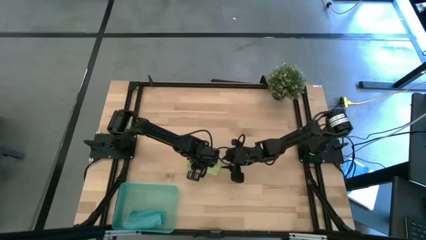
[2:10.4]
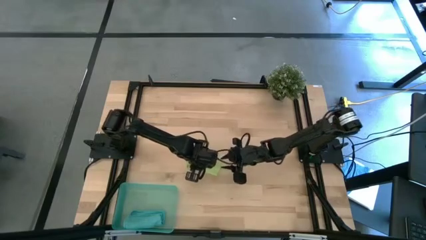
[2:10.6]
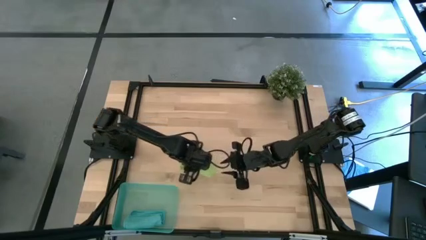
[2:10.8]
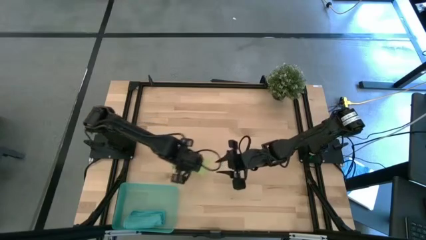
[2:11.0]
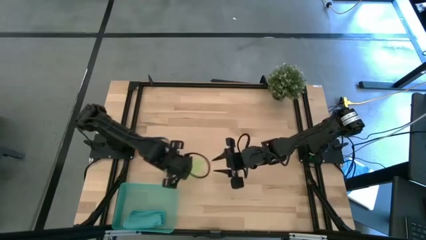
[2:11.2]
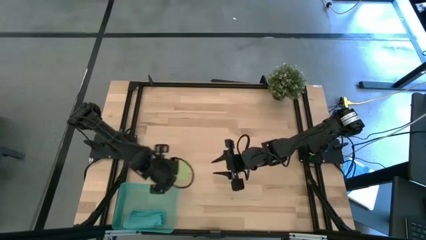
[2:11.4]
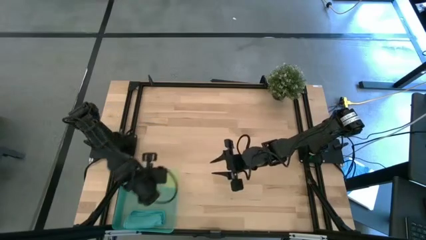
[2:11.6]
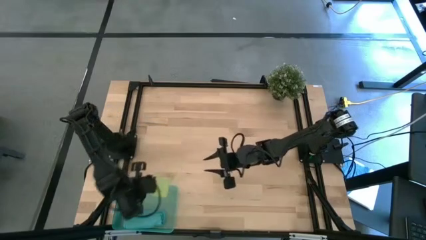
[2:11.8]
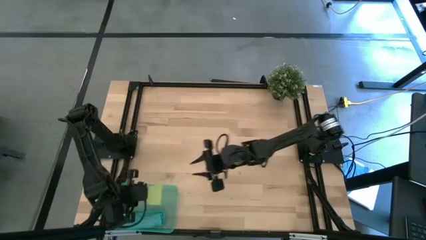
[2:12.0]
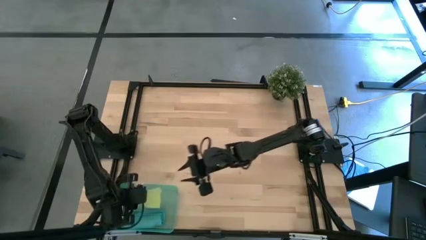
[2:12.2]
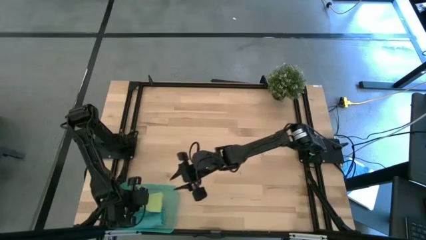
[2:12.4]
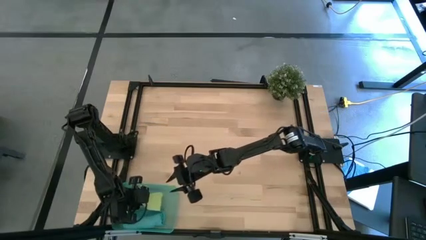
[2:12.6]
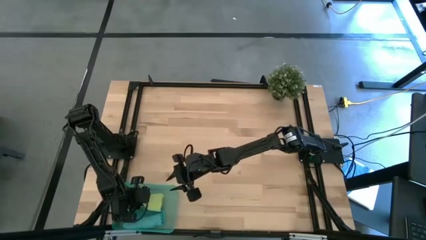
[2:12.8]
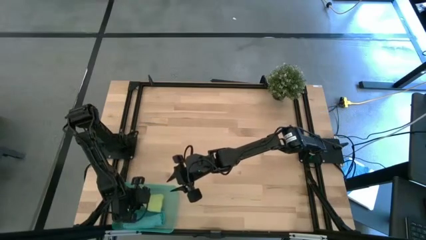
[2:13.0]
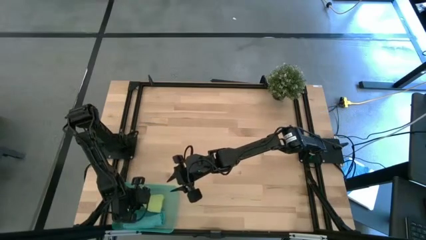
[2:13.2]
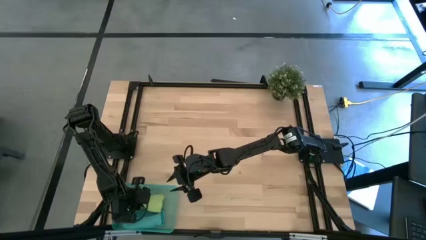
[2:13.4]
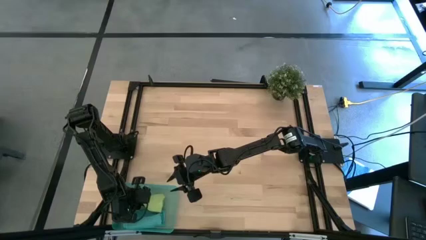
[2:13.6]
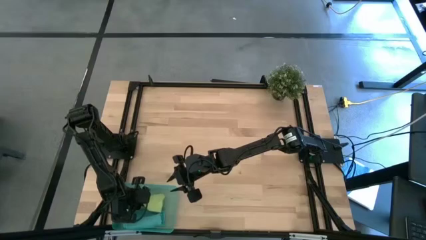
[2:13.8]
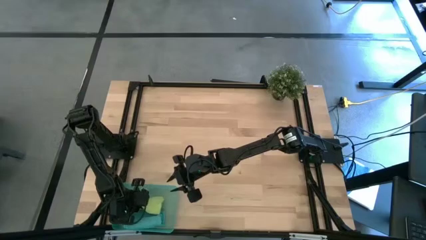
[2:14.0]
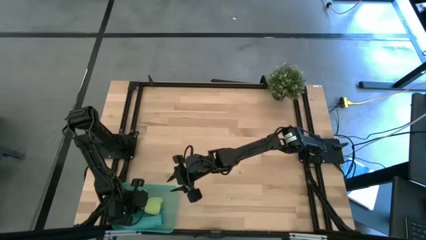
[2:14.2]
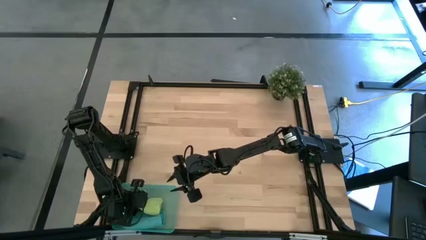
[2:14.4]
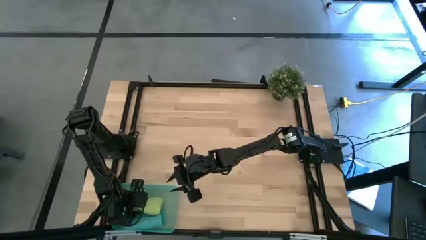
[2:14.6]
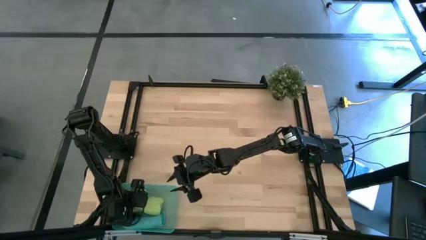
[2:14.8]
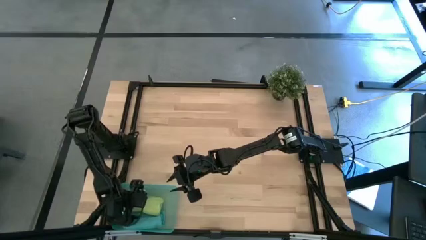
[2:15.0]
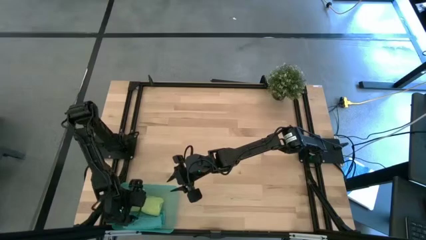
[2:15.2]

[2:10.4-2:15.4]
Task: Roll microfiber towels into tight, uniform cylinder then place into a basket
Put the rolled yellow green microfiber towel into the bin

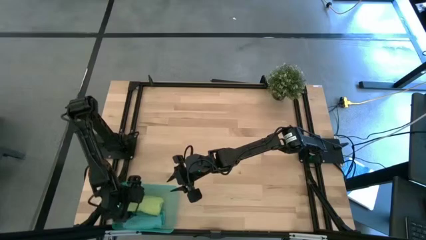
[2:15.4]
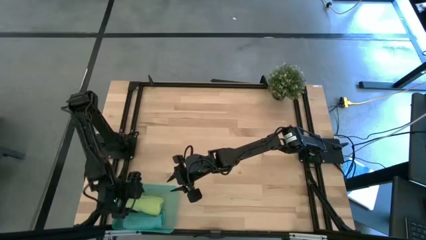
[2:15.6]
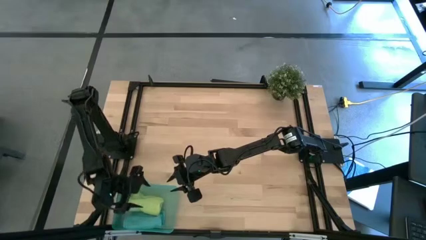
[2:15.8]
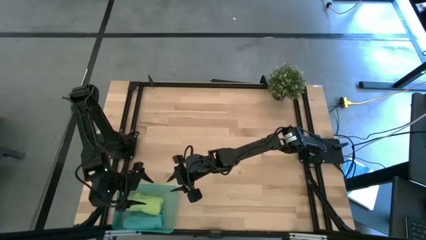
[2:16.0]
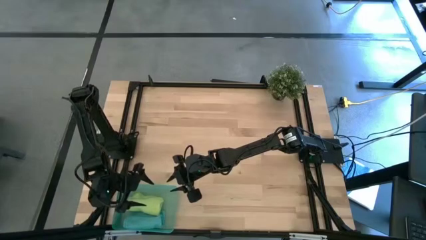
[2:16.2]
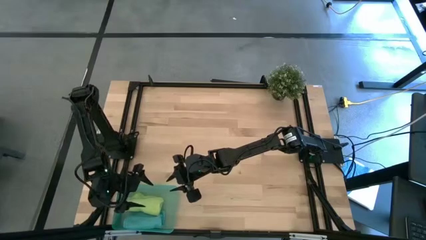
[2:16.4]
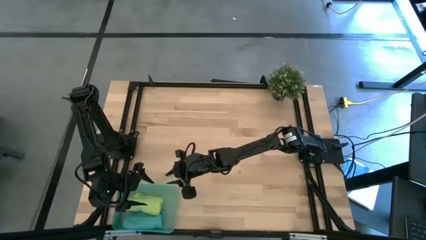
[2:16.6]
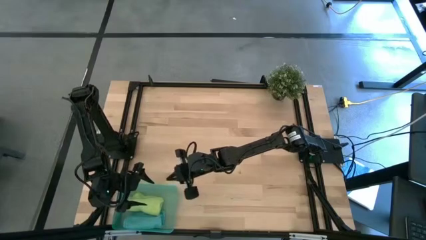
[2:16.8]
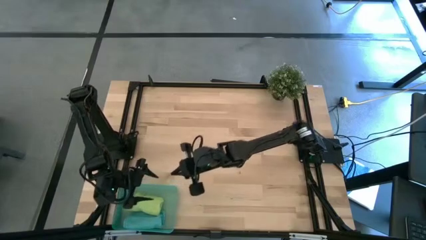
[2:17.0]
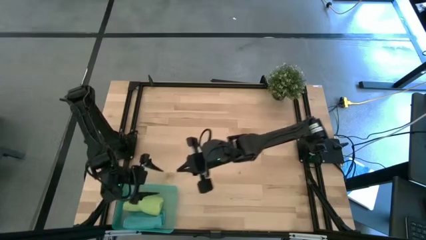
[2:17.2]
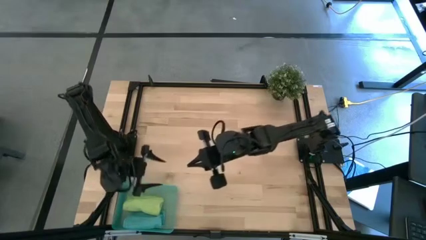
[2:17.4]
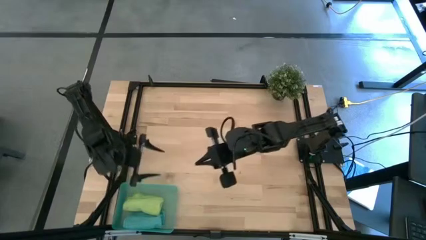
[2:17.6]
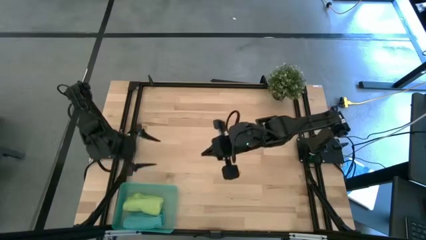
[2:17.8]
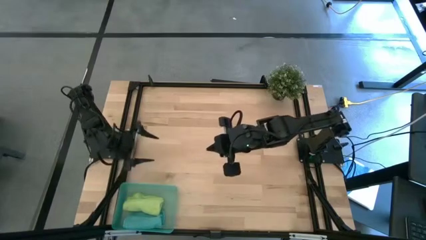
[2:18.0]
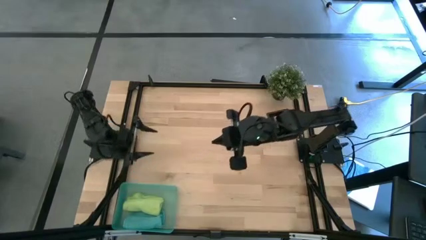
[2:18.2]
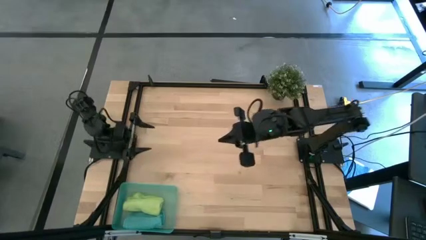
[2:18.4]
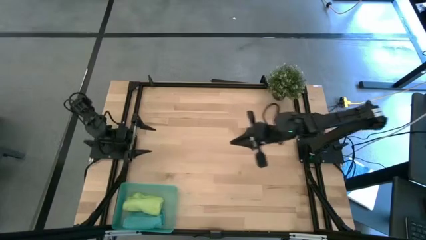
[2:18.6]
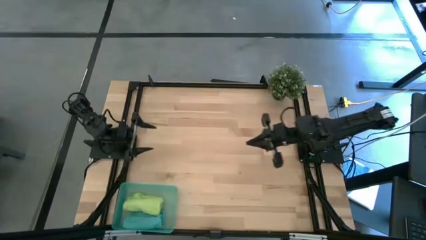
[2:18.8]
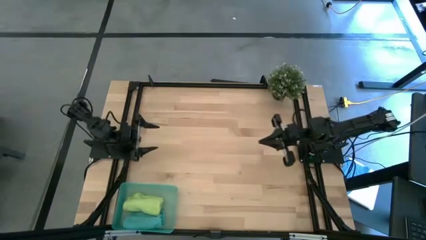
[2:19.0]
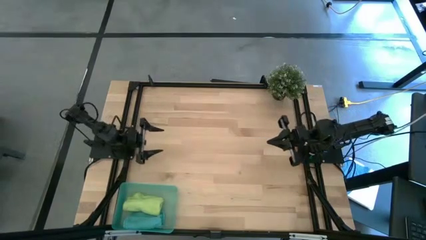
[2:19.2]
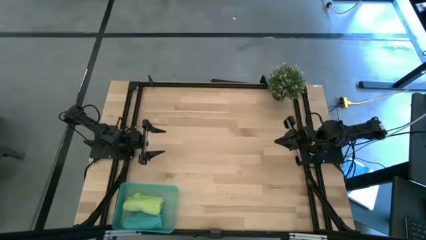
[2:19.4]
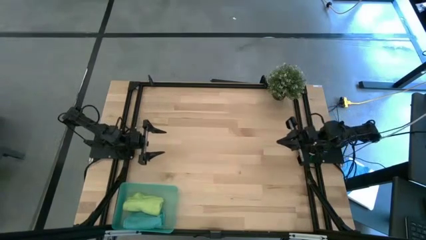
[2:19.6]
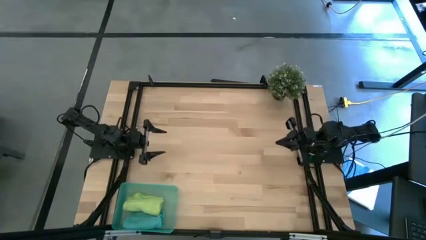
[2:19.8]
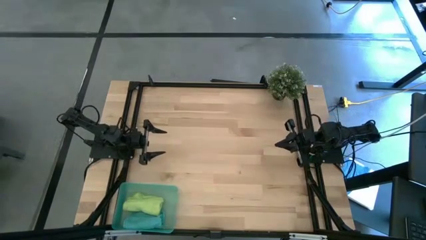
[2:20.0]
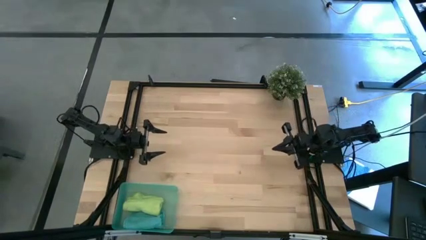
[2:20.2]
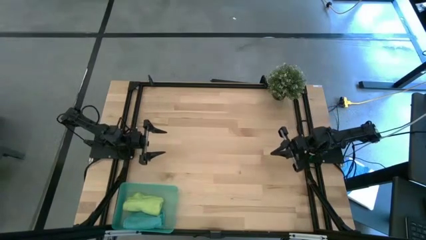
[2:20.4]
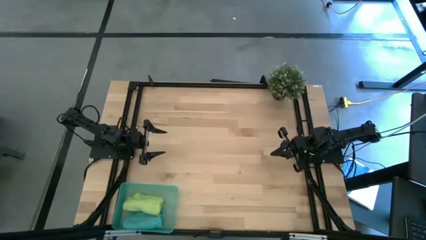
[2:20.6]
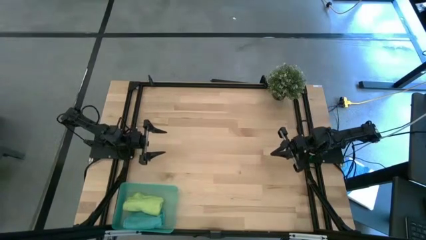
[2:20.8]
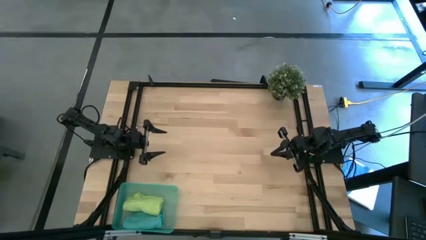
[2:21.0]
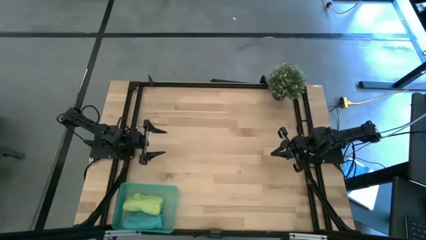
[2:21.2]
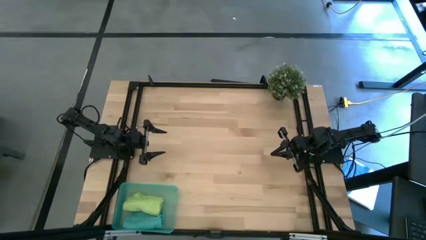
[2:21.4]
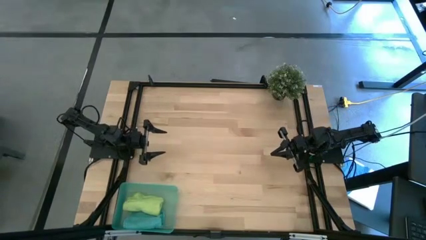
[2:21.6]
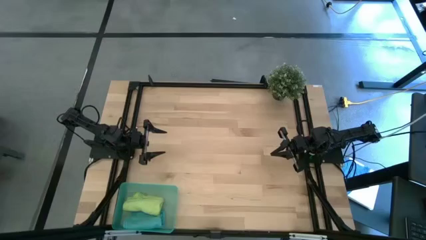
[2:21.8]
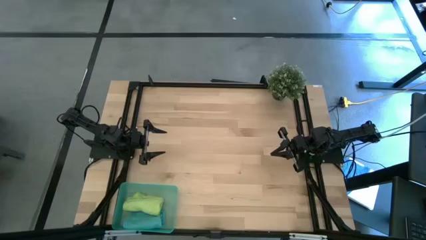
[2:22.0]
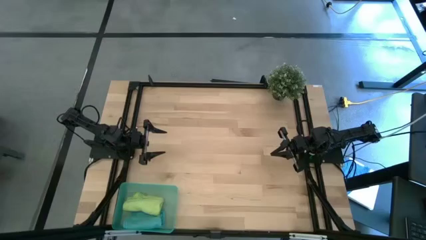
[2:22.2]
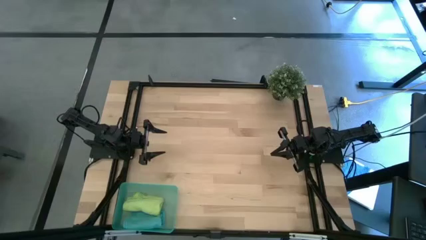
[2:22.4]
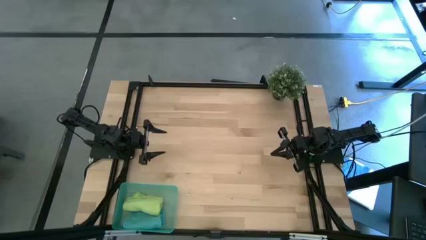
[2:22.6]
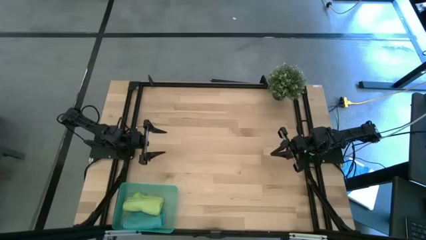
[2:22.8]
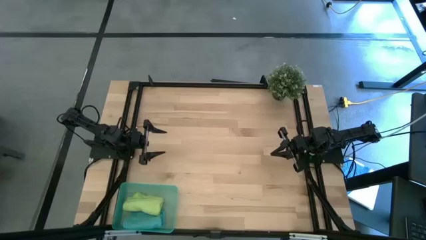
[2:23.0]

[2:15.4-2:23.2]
Return to Home Position

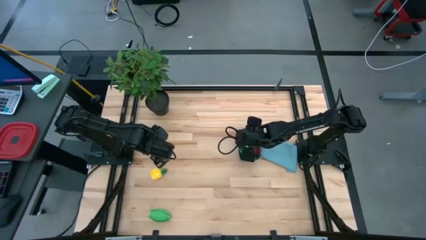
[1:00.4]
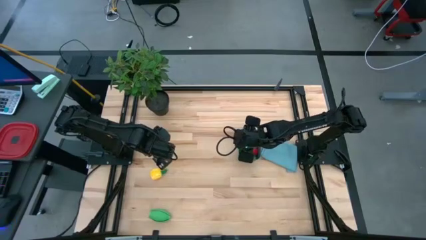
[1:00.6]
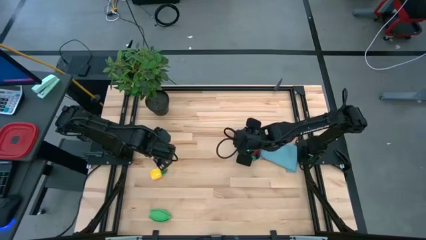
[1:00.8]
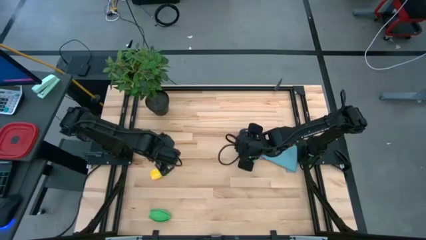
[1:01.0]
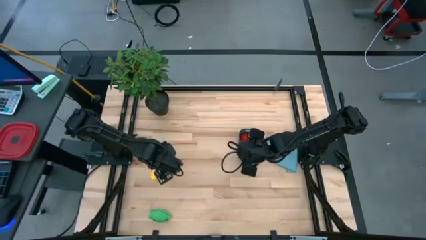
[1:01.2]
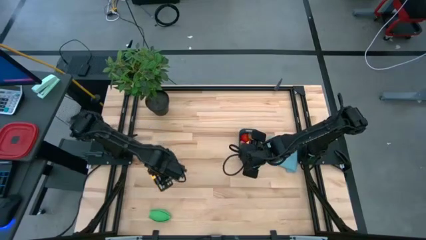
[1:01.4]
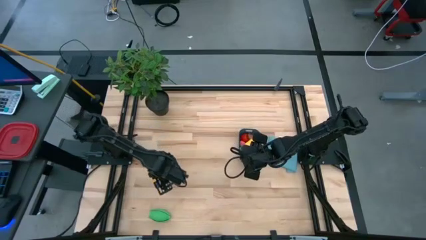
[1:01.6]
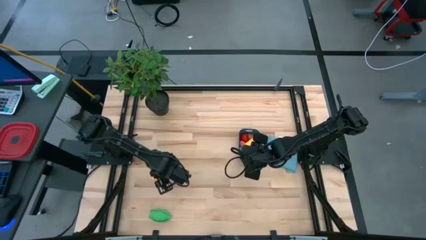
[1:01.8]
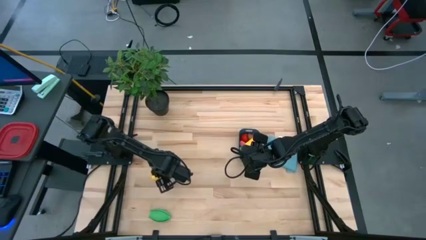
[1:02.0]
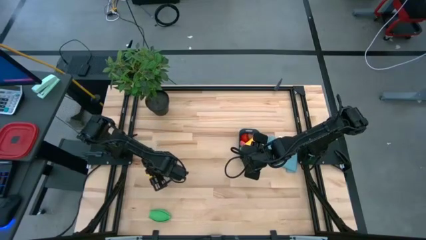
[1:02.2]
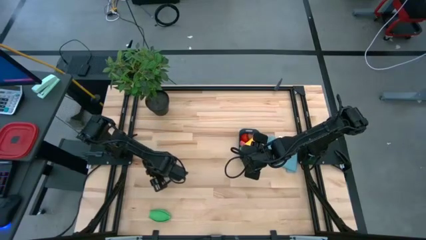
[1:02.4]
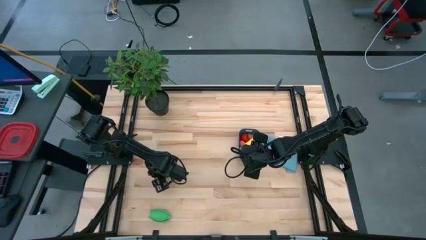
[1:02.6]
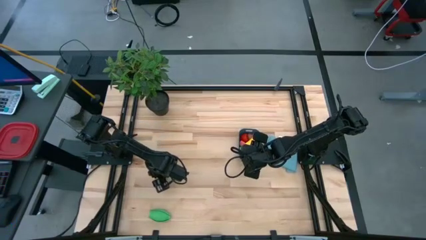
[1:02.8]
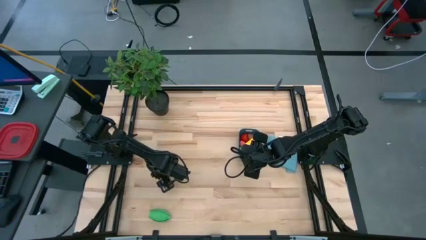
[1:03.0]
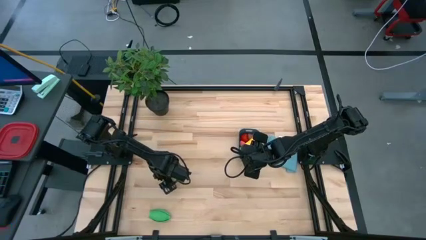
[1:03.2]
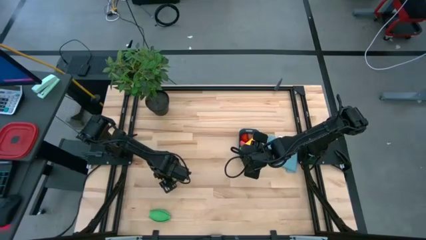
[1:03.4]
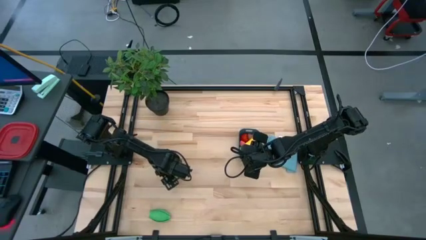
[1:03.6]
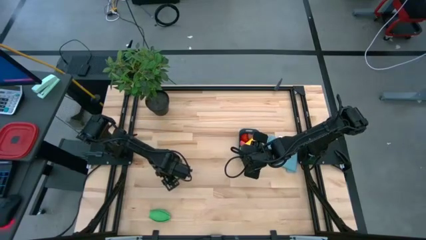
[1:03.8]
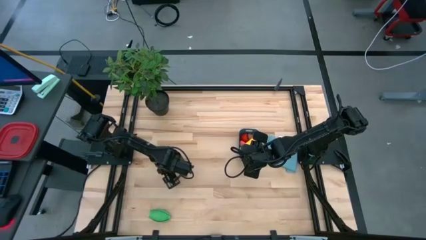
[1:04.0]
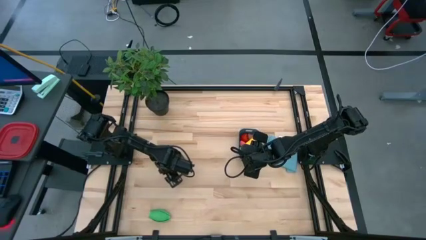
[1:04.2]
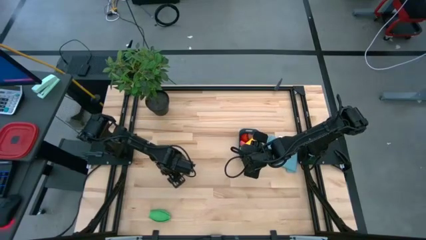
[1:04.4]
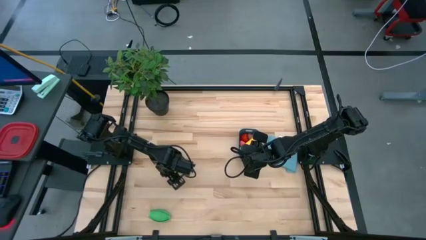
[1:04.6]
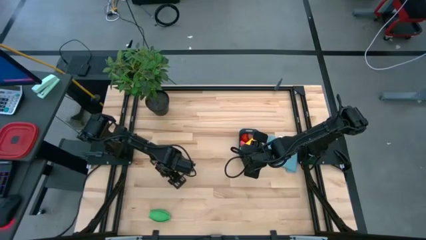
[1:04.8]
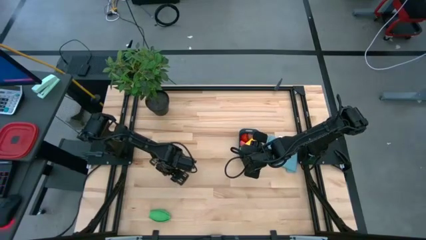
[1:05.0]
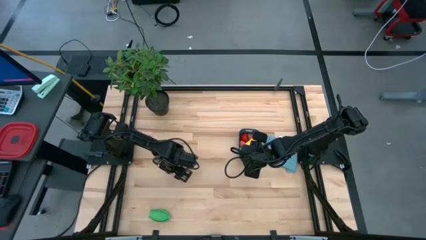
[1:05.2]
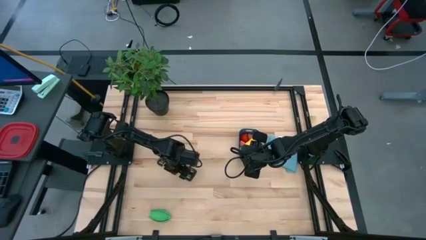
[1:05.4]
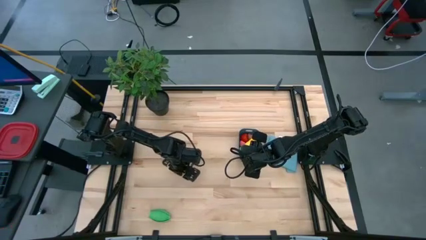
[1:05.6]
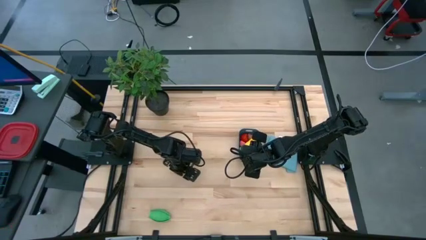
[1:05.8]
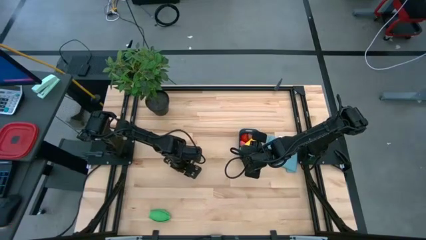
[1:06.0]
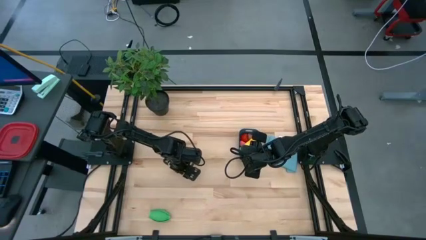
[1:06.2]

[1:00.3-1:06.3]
Task: Pick and placing Produce into tupperware
Put the yellow pineapple into the blue bin
